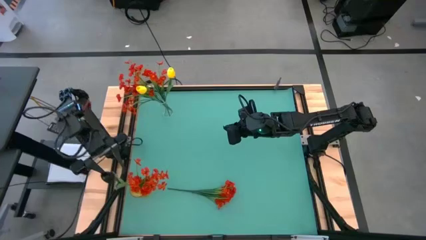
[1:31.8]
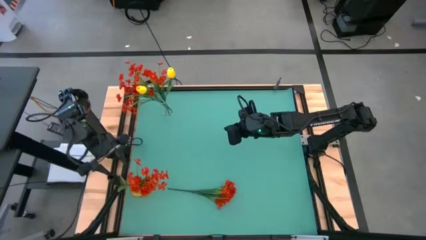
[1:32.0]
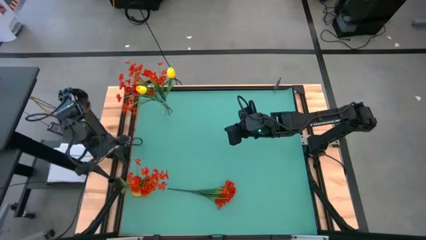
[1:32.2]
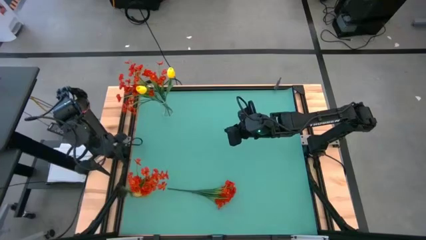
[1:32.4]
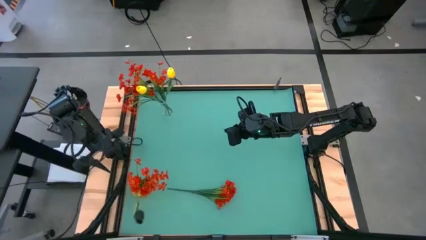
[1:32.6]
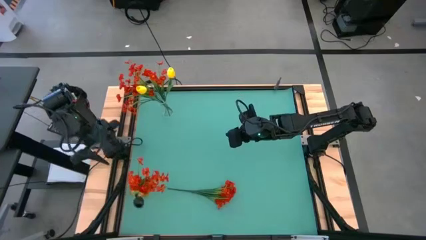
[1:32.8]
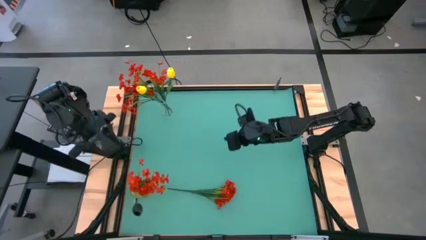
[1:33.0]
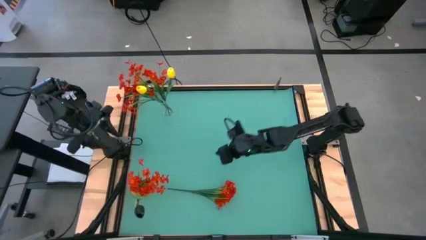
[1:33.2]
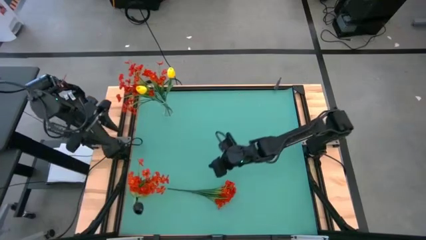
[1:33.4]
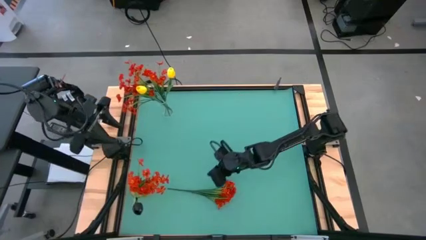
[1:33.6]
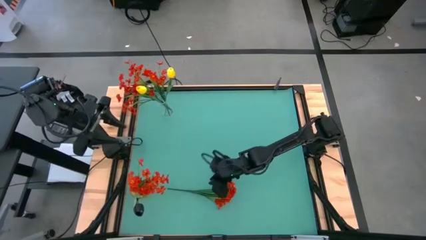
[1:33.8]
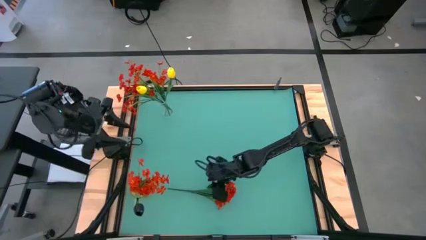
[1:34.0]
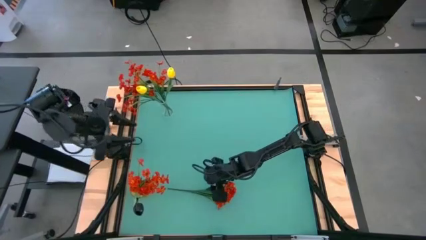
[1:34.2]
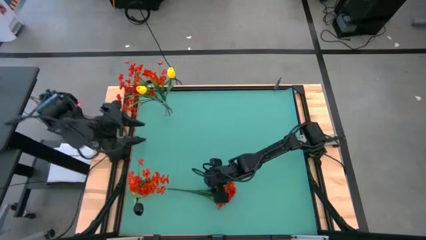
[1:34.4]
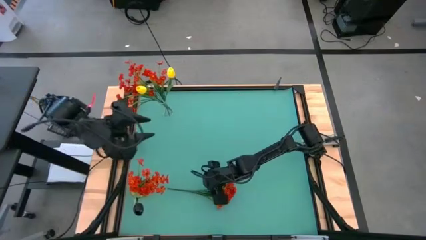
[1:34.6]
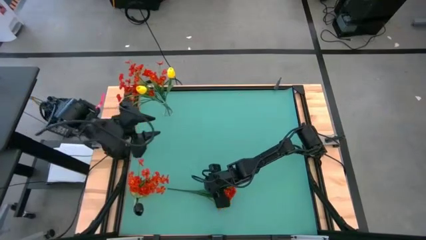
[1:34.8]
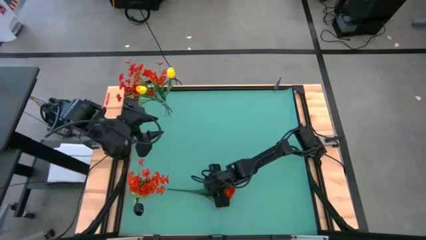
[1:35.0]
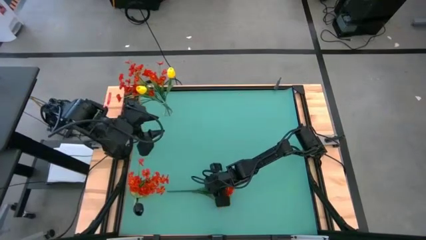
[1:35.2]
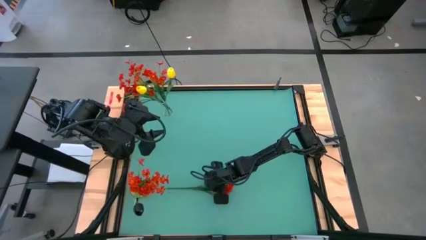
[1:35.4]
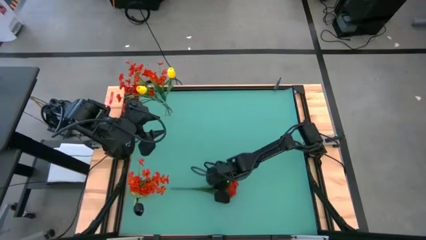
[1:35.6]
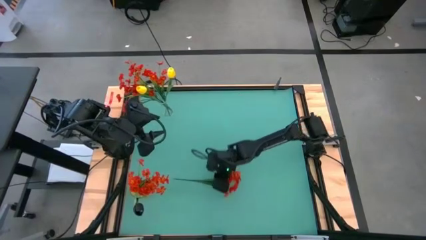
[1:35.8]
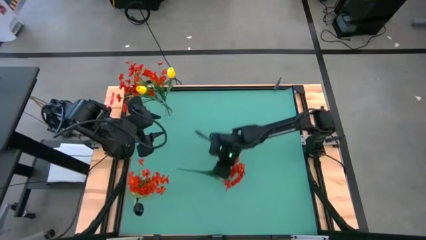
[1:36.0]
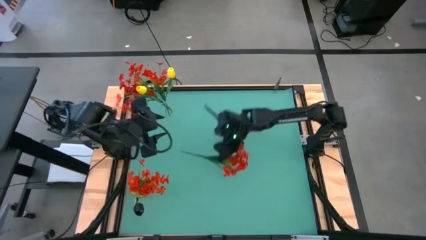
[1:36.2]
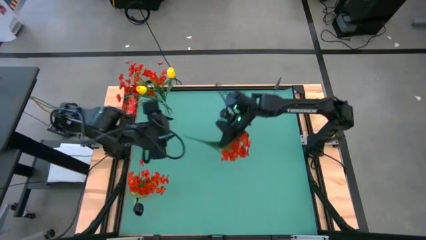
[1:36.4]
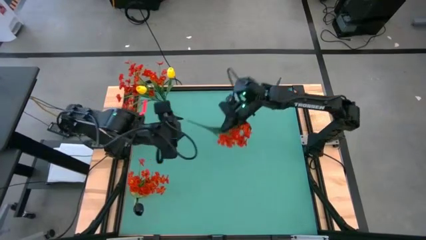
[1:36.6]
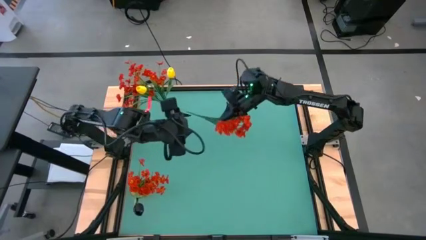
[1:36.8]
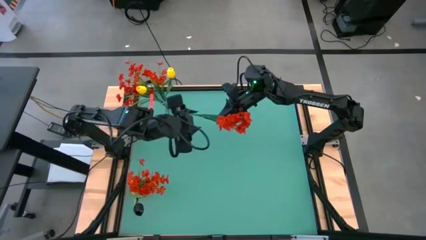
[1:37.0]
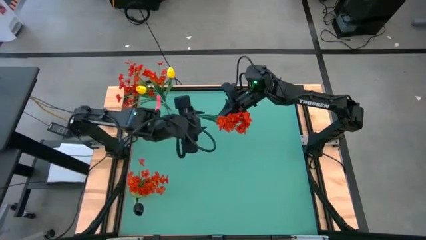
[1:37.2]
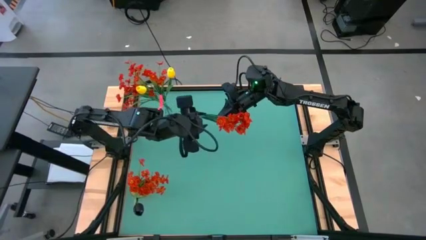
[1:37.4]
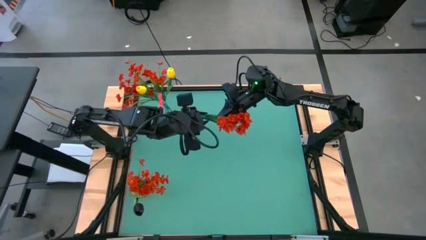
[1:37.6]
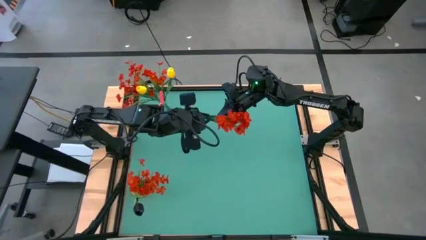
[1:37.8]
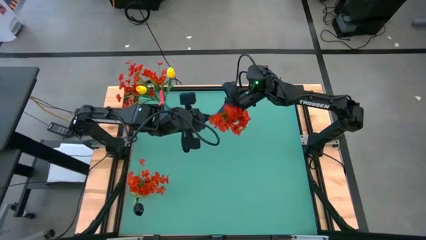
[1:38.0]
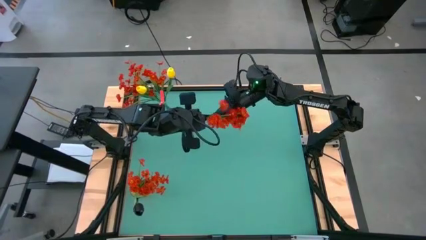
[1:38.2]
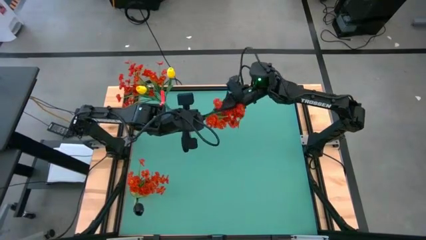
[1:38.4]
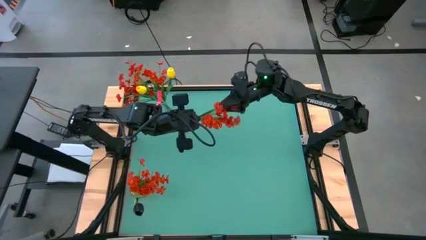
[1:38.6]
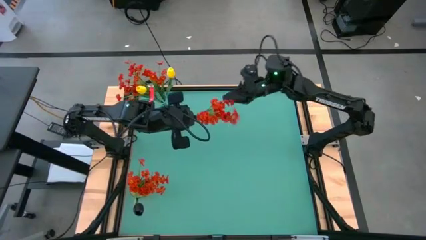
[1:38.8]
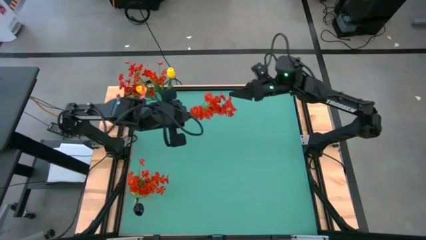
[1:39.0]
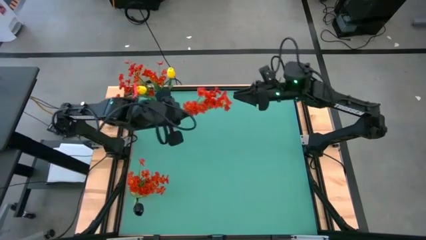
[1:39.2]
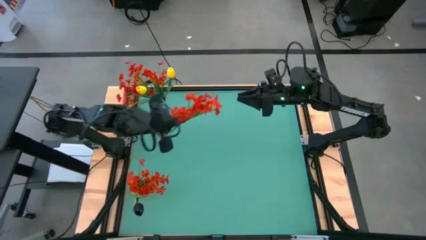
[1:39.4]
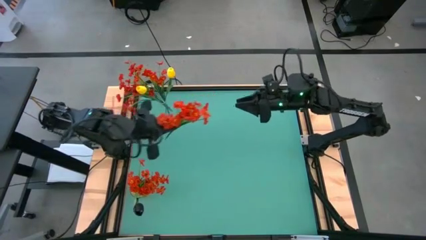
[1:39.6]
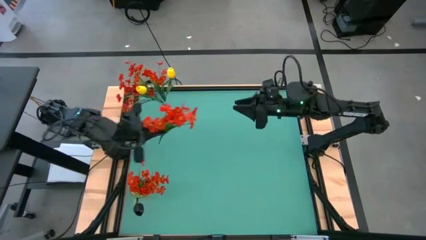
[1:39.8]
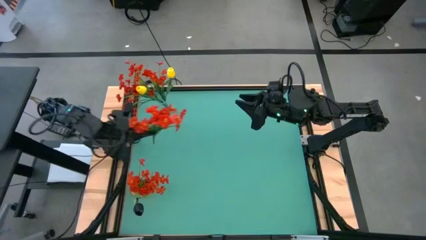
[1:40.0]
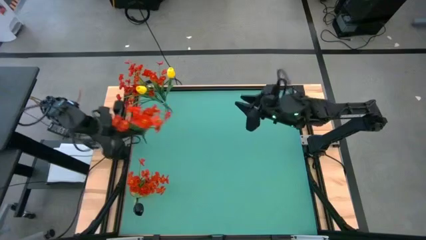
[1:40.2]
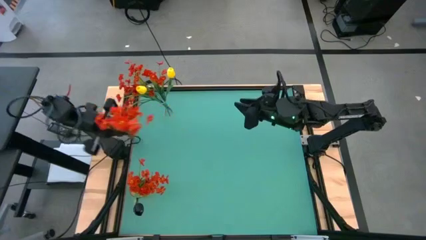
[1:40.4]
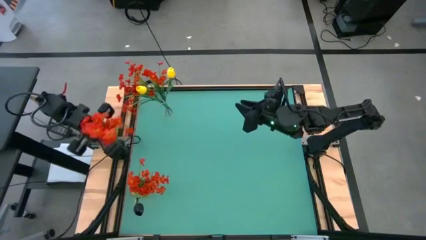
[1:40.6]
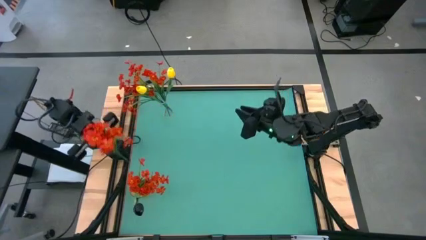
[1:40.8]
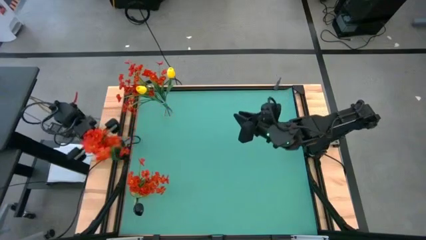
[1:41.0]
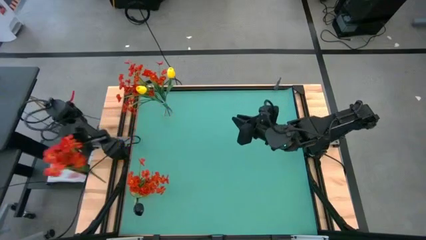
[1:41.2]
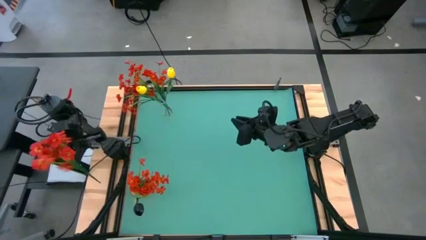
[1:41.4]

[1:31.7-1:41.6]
Task: Sort flowers into vase by color
Put the red flowers into the yellow vase

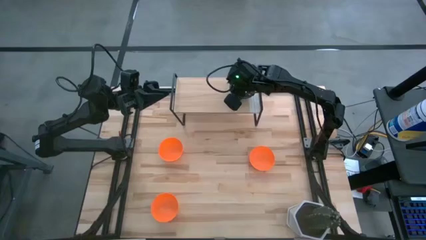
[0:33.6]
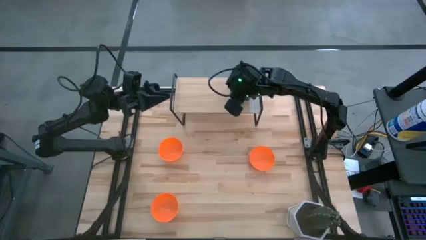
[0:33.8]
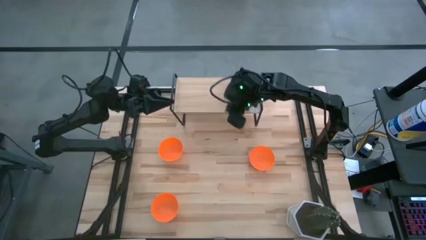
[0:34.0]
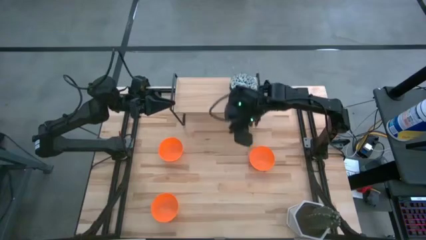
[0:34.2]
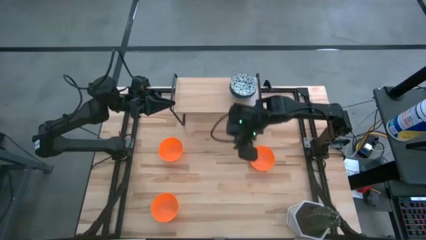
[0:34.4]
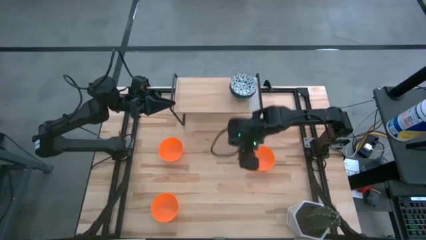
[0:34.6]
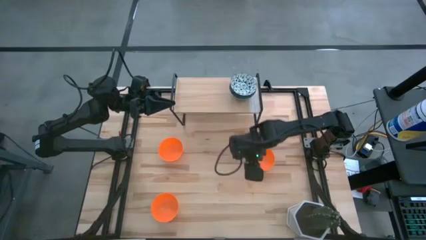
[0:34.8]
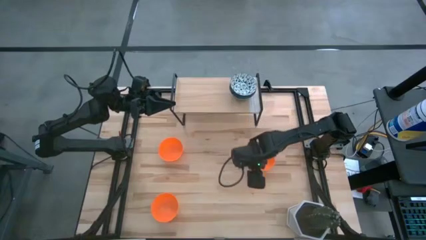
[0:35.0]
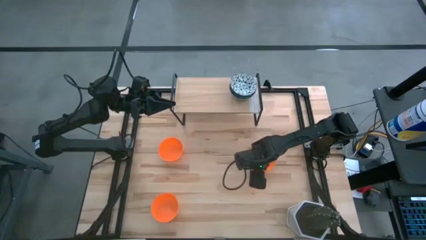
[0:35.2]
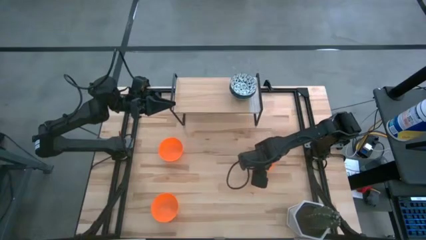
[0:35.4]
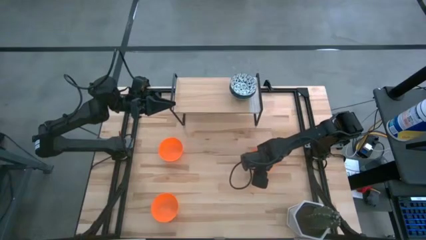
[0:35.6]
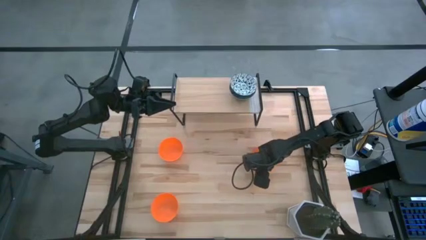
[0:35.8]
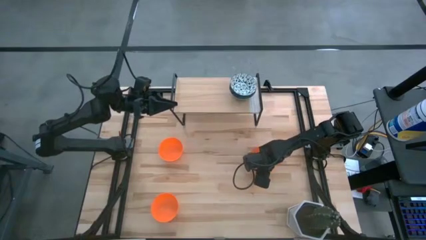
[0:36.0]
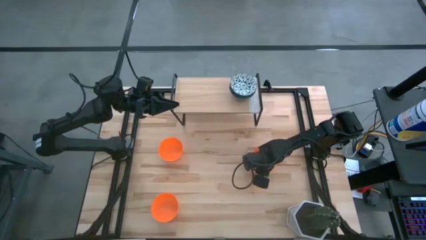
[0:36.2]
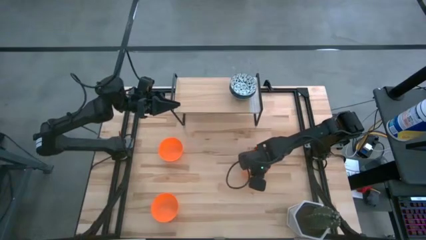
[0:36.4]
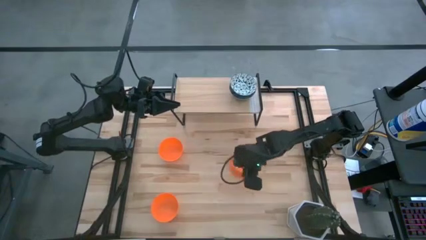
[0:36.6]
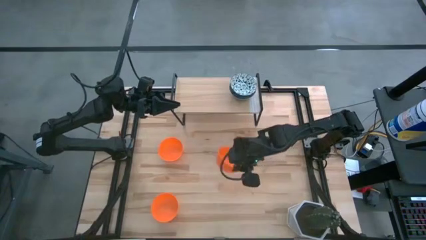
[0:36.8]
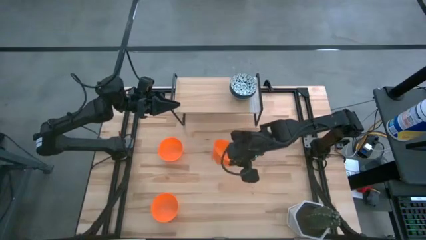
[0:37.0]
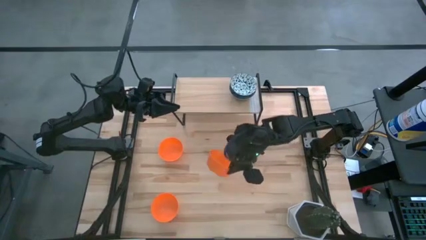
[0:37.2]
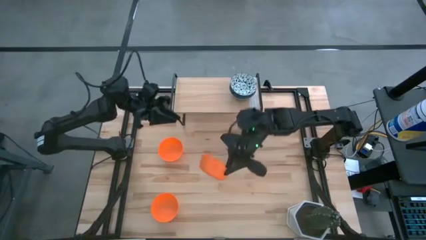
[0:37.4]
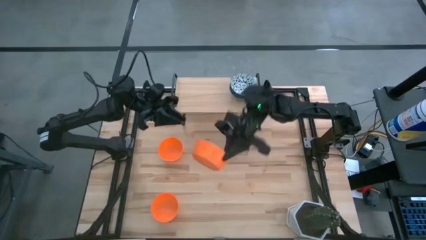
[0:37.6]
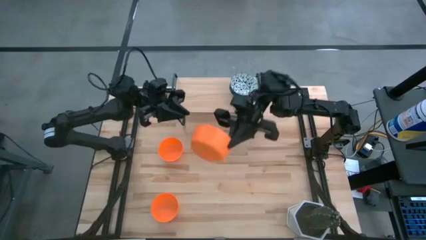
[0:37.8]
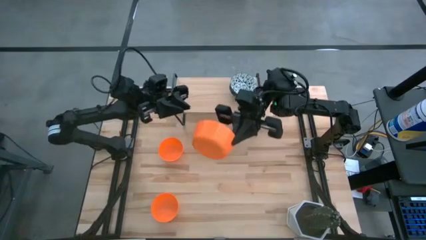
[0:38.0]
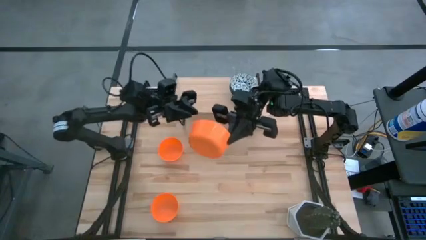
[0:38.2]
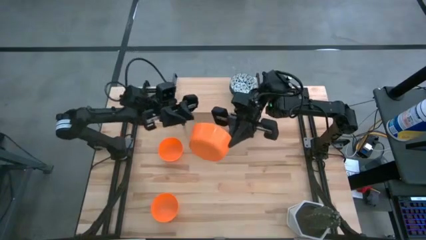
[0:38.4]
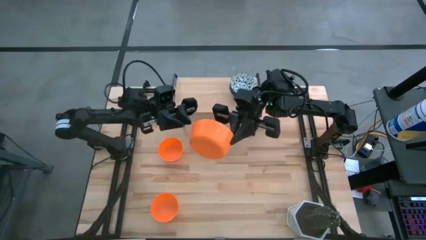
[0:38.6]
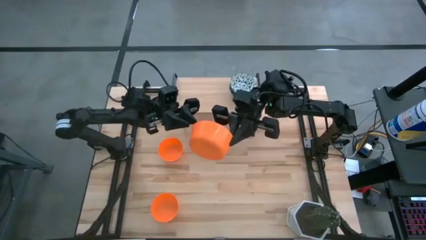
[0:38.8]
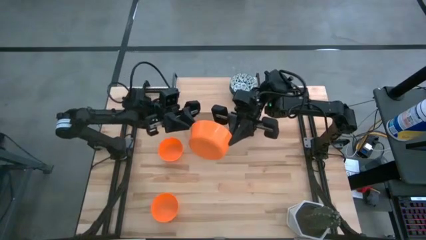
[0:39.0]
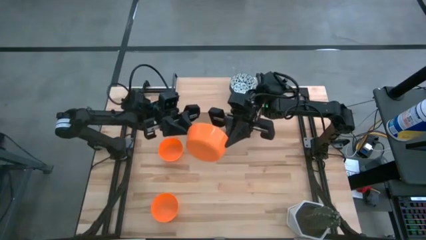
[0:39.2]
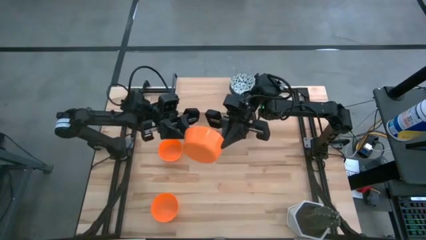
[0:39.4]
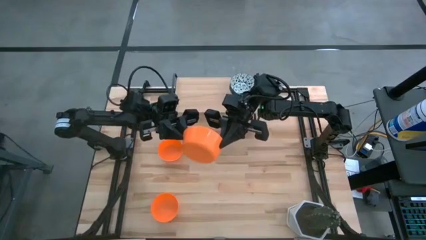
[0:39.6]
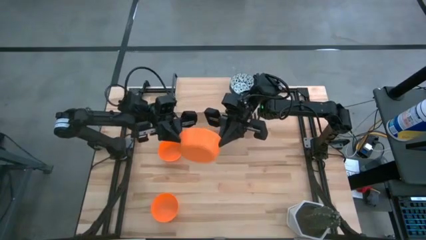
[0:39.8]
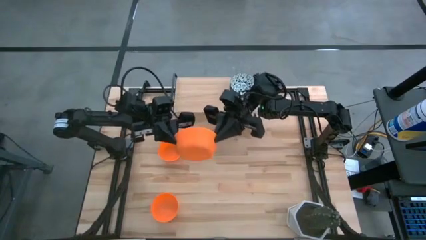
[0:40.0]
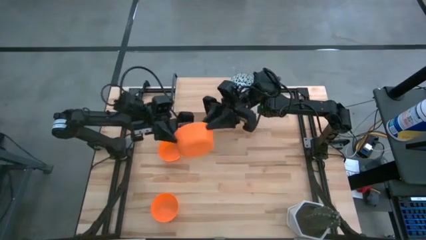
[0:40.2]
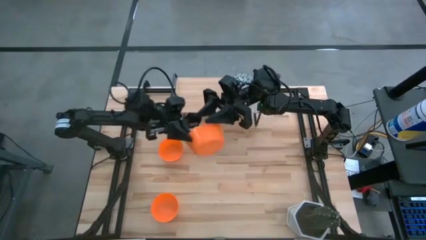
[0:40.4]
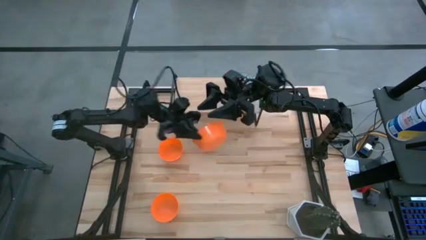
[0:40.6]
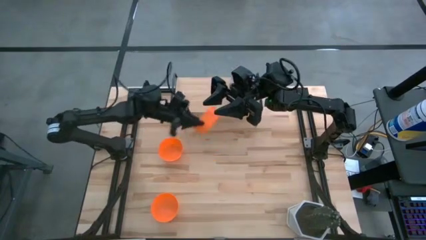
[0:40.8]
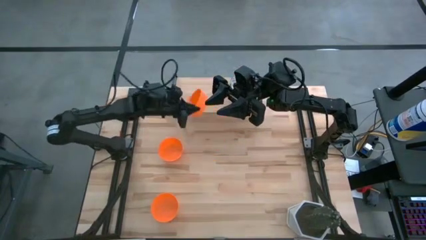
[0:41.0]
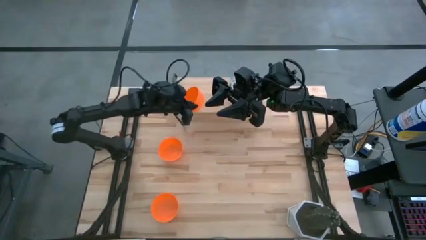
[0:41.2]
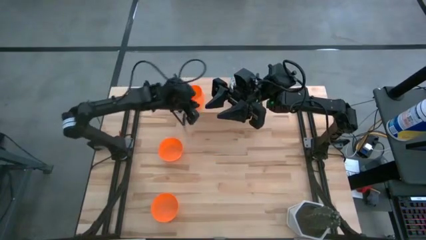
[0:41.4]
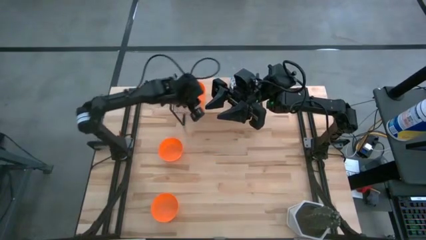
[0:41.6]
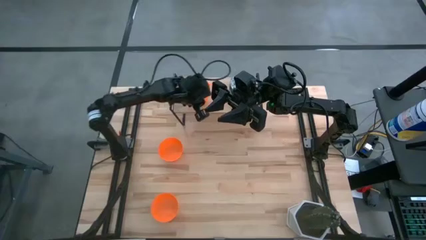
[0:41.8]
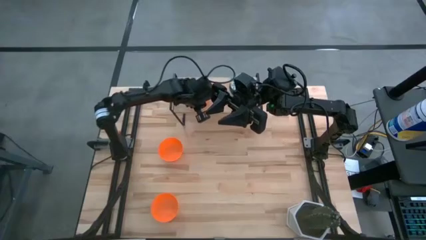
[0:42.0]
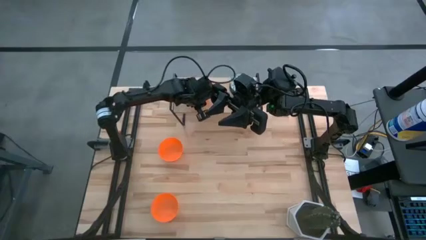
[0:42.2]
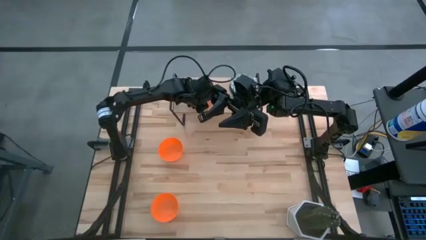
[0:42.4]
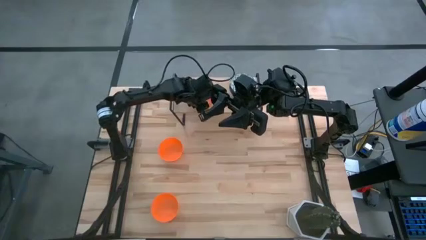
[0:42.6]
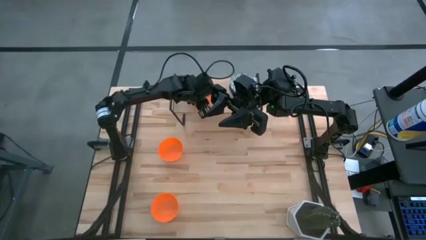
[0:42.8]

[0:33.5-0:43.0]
Task: Pick & Place Mini bowls
Put the top right orange bowl on the shelf
